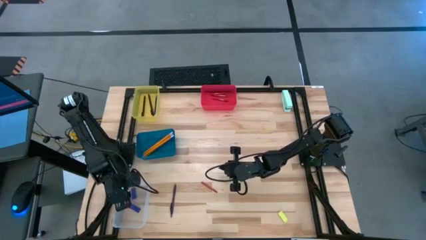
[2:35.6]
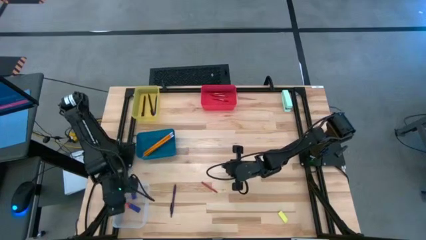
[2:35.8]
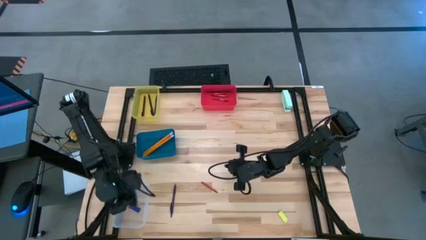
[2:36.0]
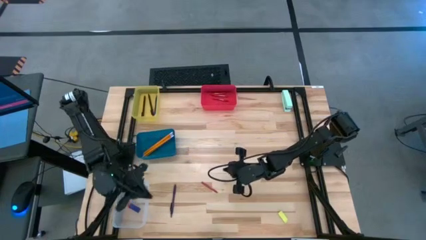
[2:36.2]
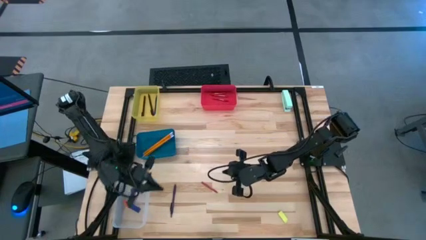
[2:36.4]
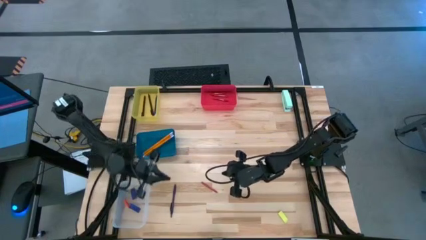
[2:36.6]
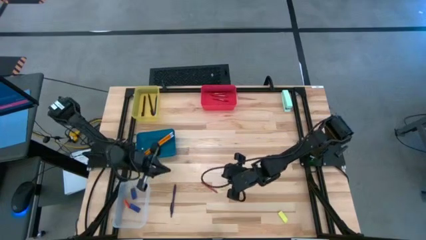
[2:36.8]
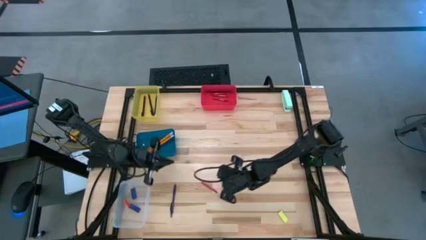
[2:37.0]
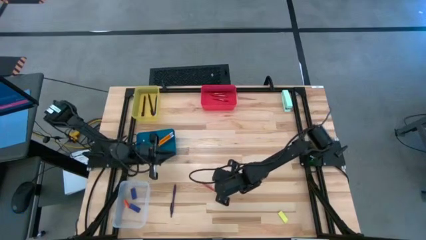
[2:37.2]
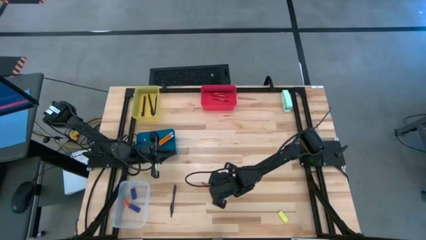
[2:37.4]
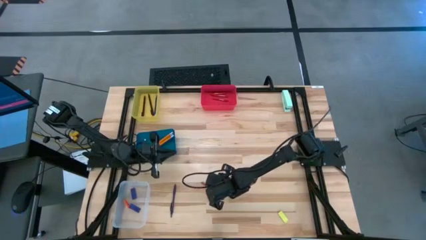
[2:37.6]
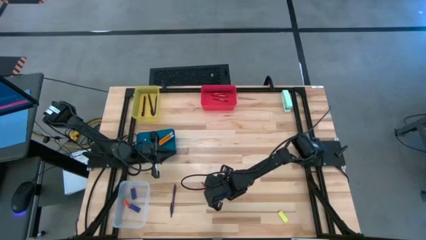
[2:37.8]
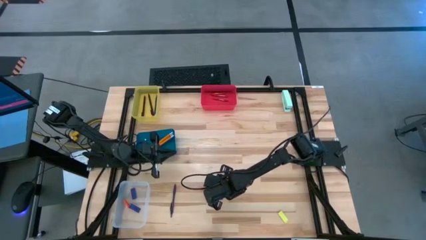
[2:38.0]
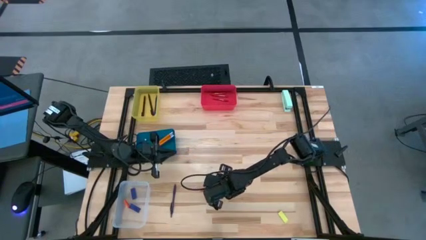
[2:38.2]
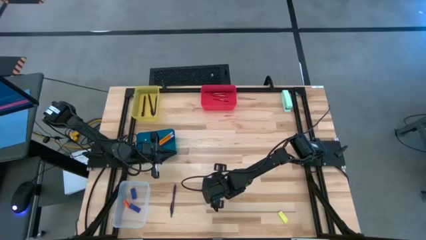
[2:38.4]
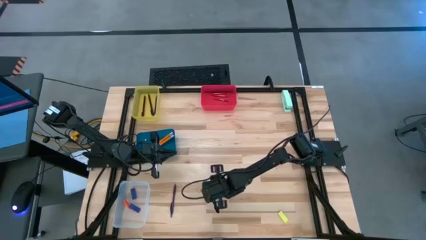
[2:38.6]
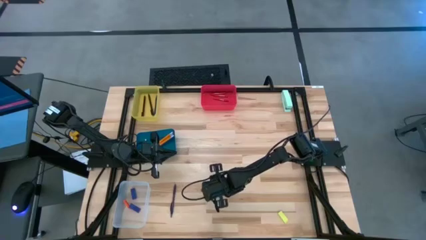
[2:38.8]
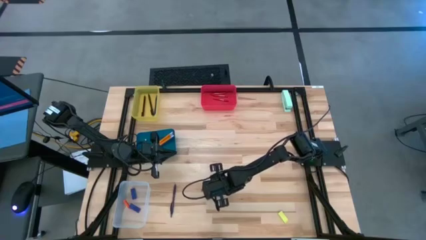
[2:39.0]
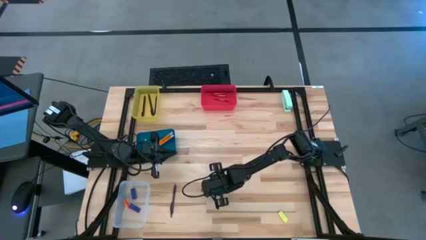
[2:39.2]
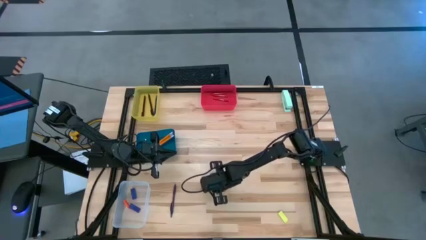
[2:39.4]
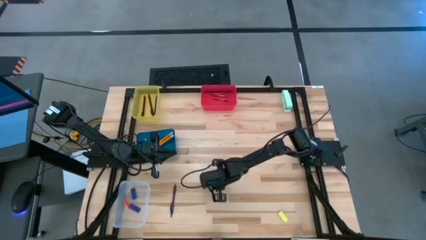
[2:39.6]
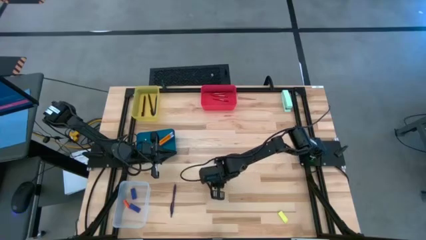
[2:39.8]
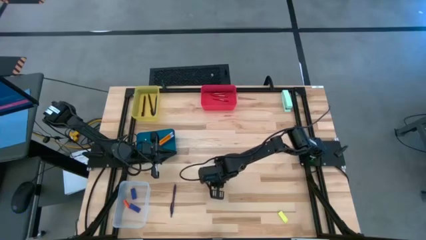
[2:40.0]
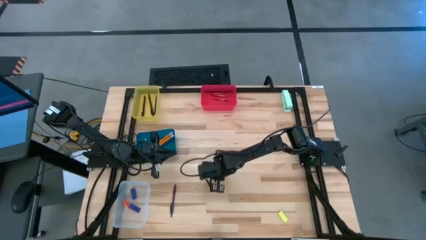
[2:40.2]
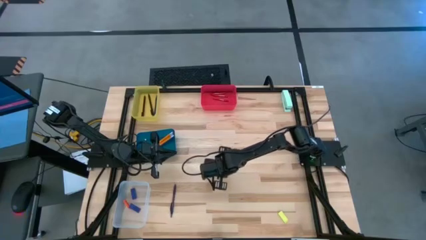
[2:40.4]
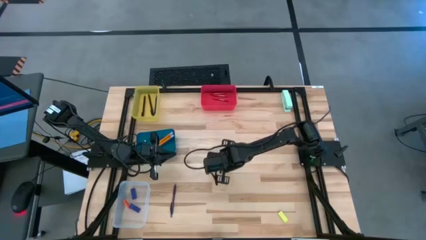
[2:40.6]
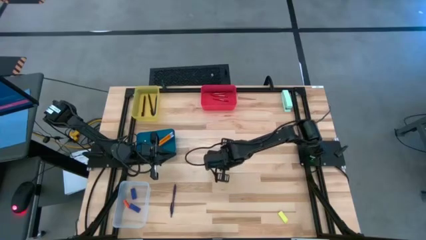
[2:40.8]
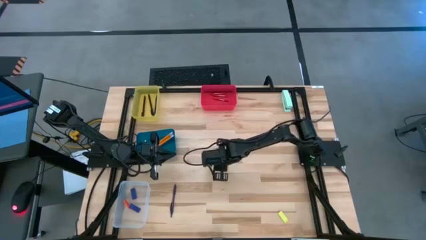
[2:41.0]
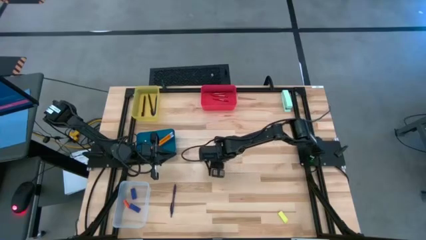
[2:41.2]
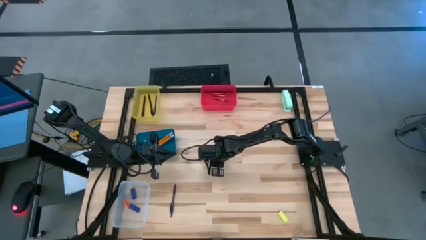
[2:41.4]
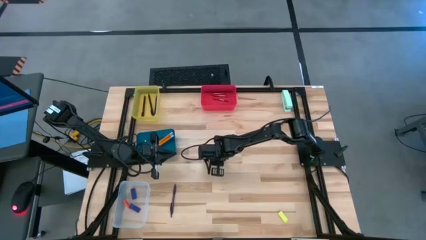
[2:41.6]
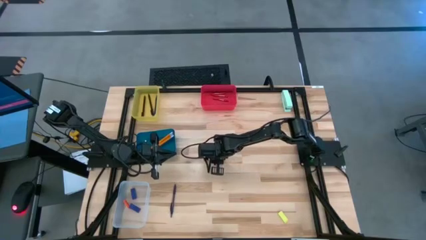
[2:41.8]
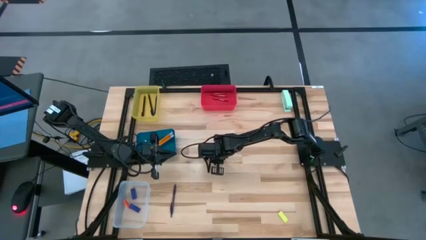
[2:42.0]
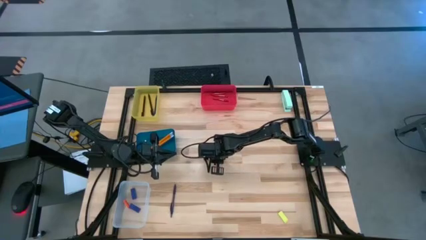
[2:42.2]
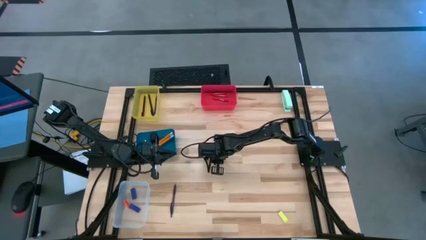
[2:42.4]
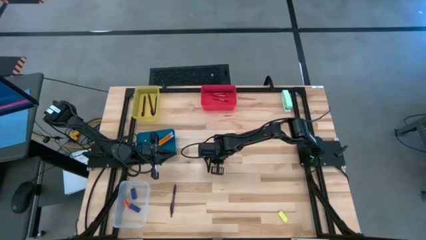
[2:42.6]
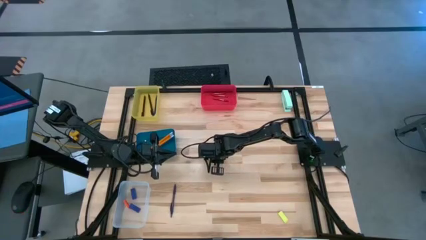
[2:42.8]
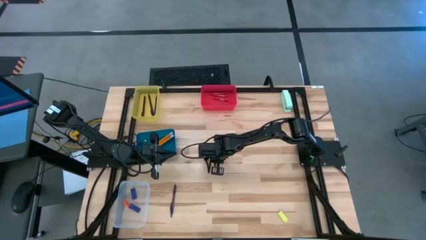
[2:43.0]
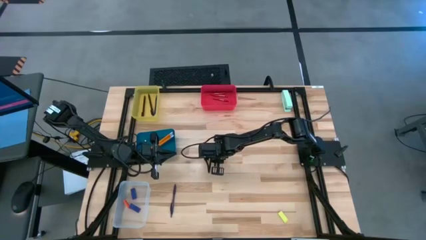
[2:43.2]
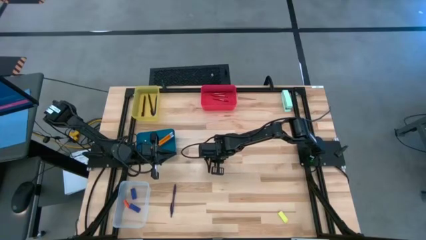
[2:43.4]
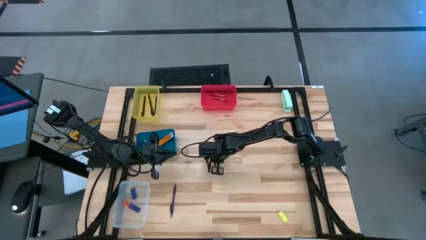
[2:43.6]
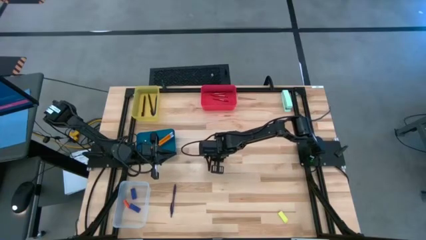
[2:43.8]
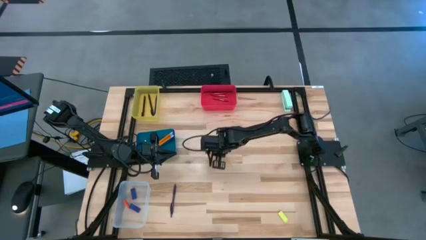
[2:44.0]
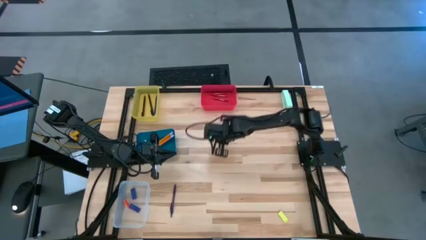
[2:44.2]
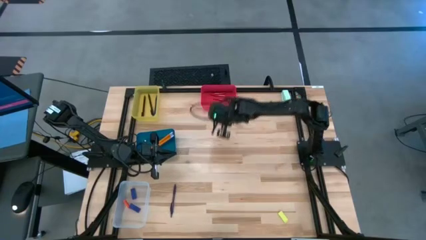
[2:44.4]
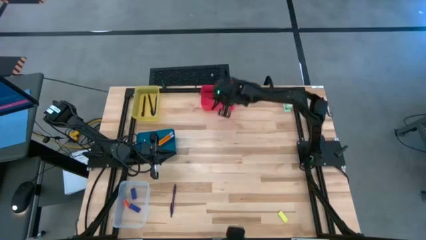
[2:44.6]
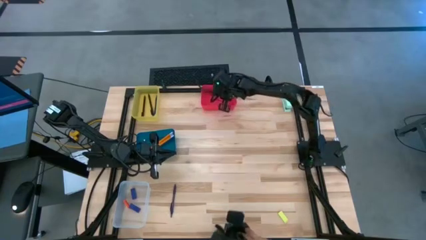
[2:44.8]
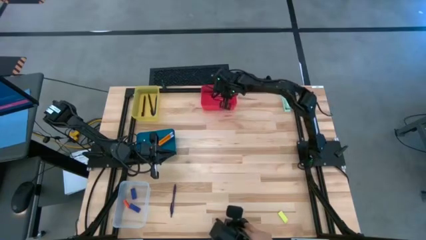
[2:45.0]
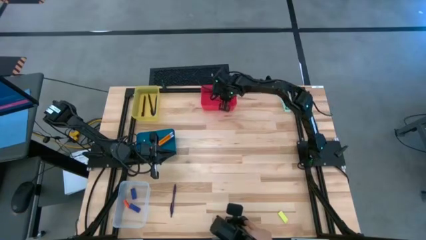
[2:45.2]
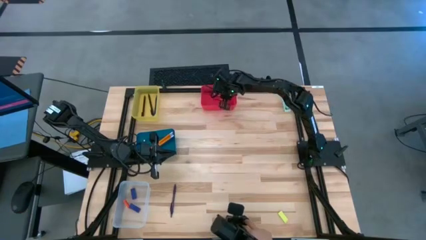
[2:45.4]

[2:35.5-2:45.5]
Task: Sort crayons/erasers/pens/pencils in bins
Put the red crayon into the red bin

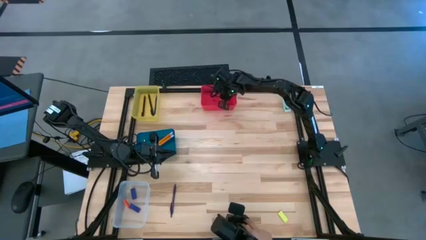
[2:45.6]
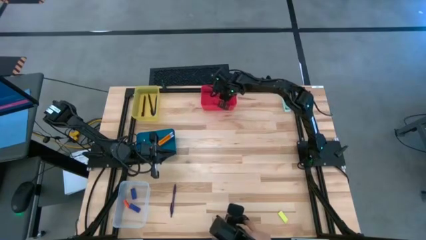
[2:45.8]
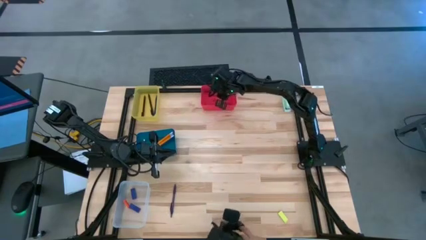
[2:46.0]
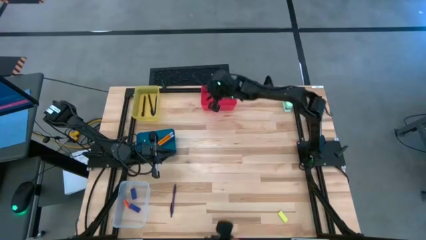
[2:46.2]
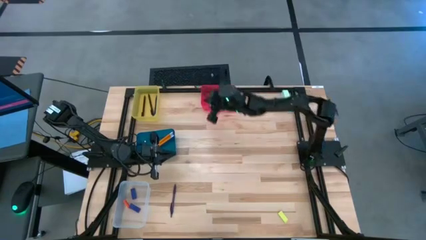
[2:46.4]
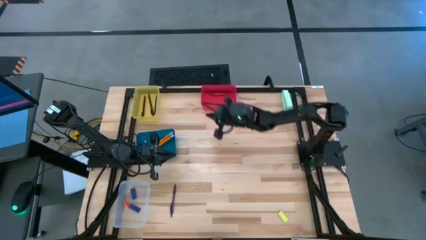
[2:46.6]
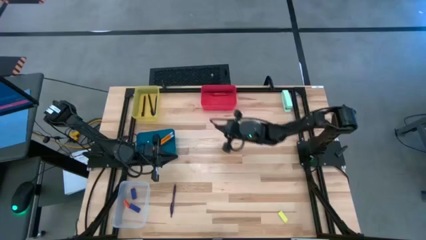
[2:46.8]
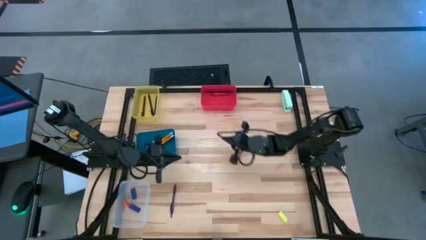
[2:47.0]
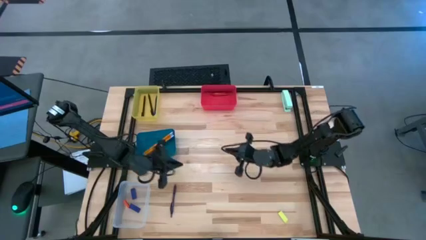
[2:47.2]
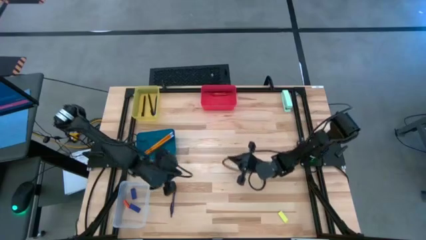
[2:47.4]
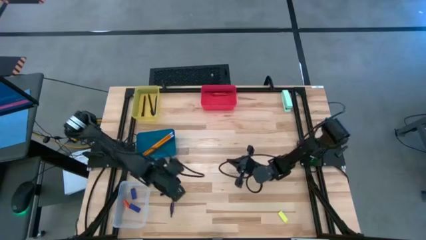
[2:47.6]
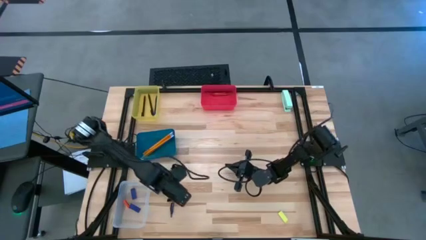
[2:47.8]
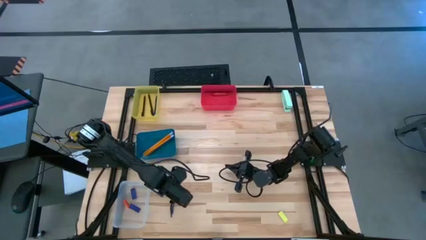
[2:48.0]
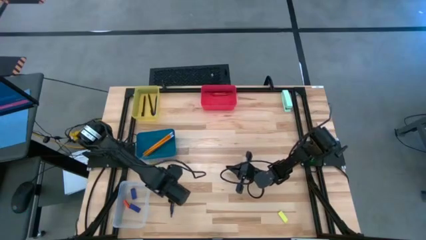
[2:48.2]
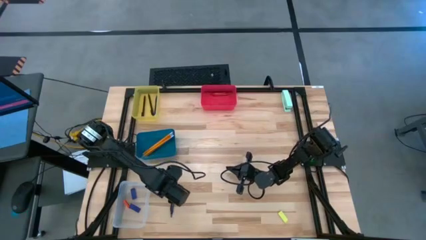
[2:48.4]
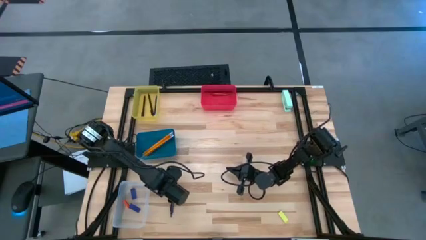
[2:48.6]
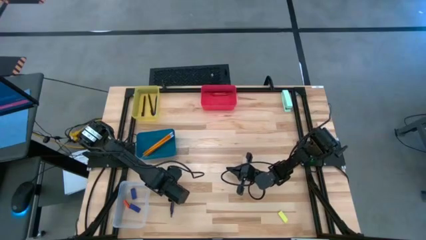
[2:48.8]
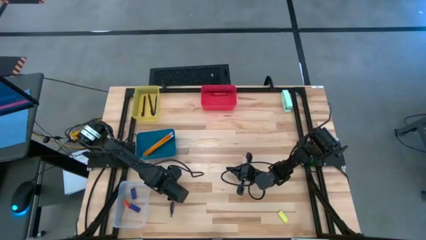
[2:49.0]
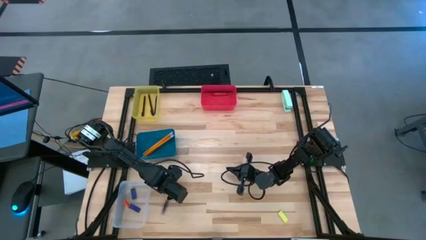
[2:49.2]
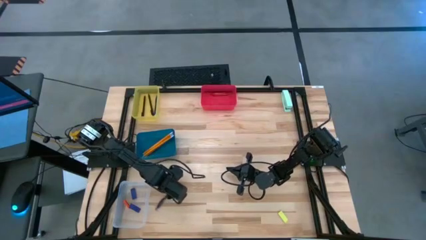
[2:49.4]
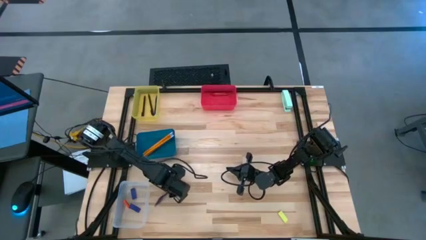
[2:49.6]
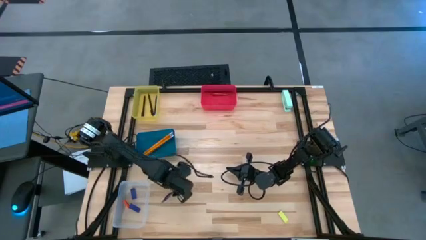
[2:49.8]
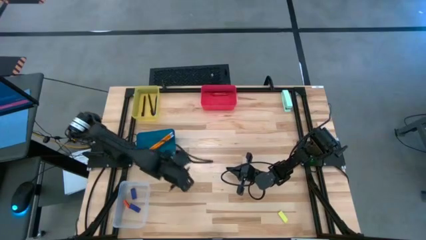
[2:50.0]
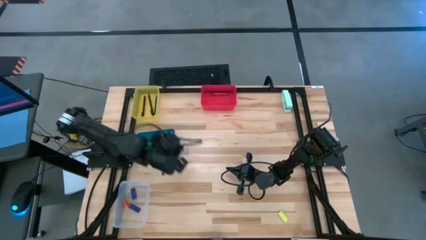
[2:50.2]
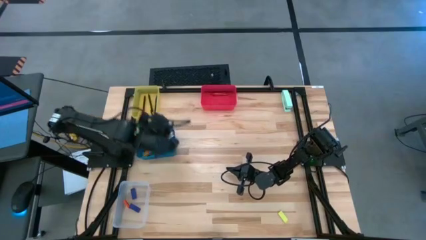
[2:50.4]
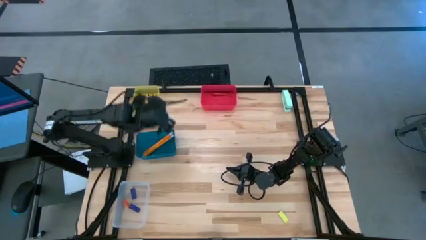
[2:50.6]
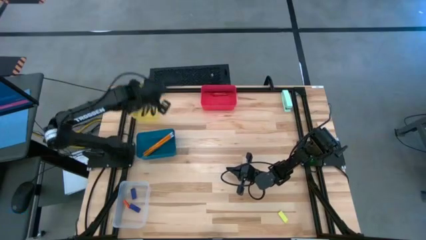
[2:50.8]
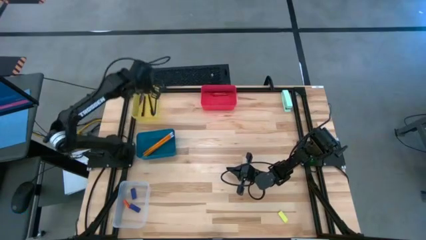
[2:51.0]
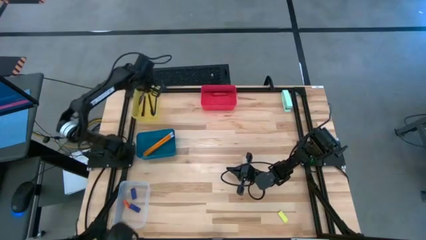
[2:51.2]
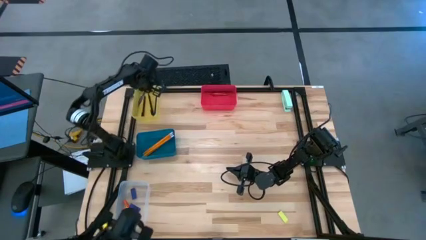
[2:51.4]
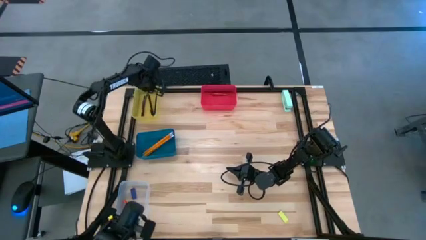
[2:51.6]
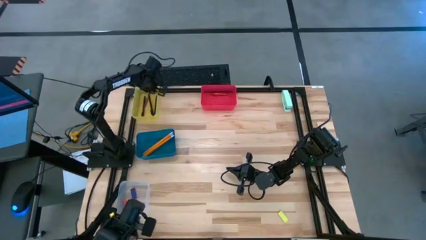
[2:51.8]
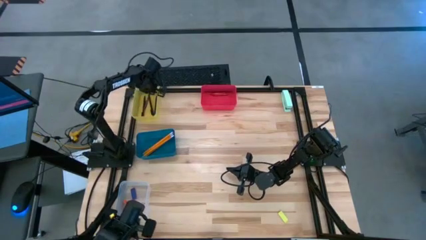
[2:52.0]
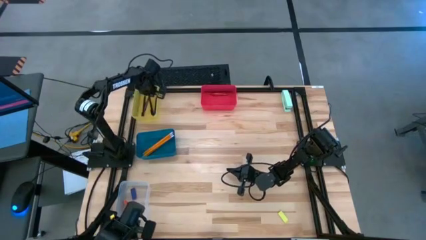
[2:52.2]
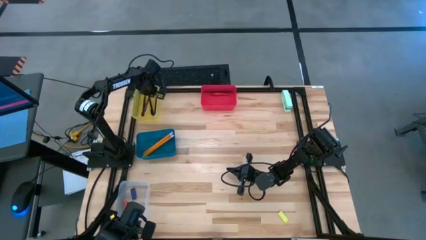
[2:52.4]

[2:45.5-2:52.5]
Put the purple pen into the yellow bin
